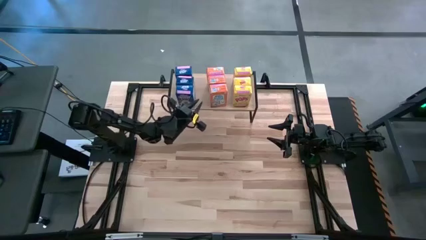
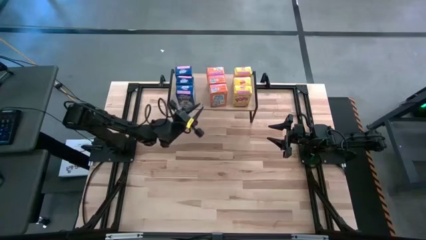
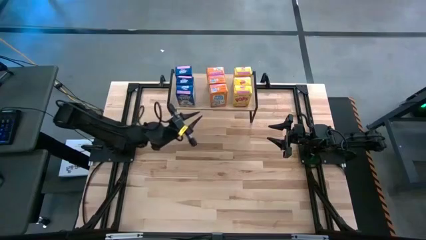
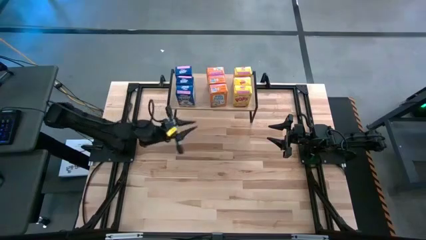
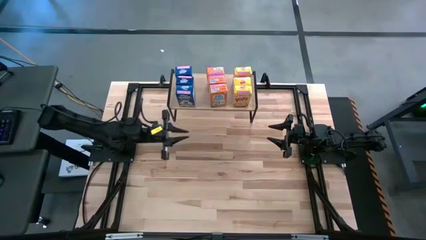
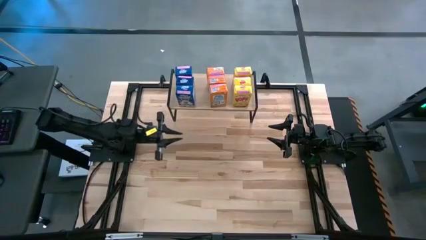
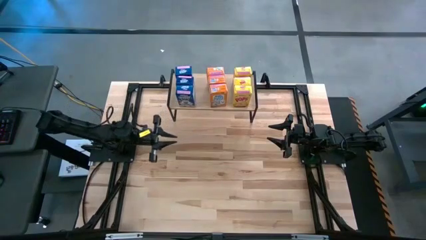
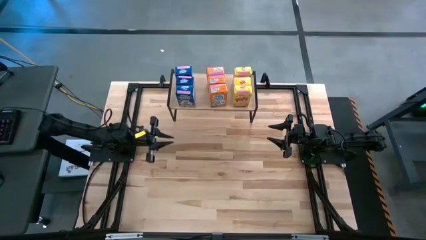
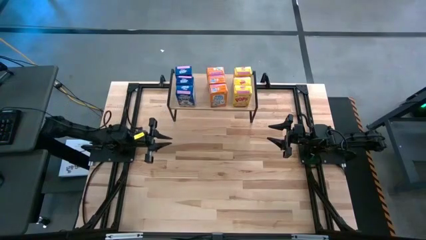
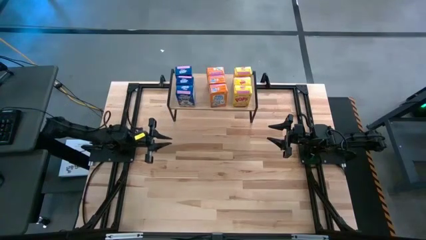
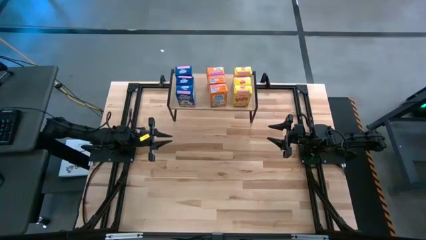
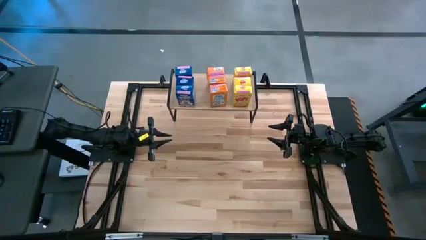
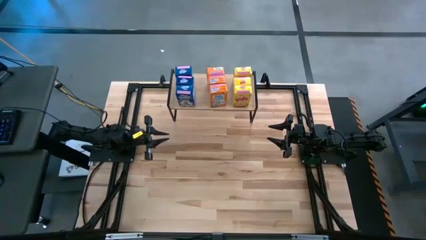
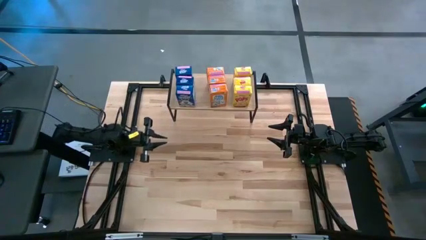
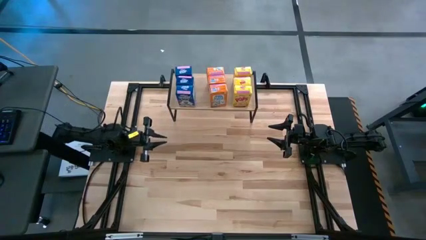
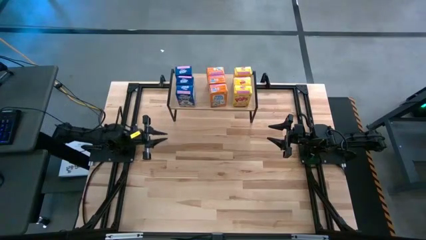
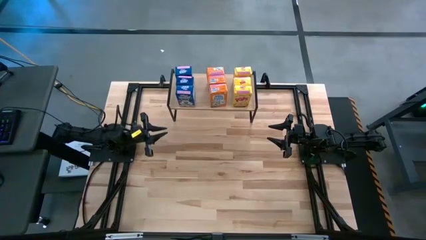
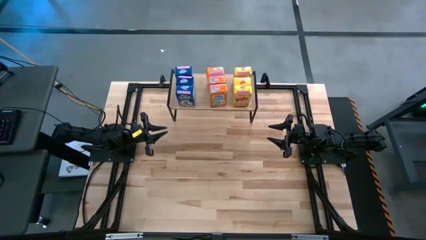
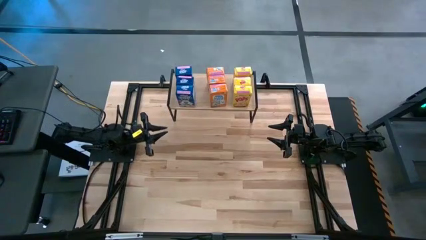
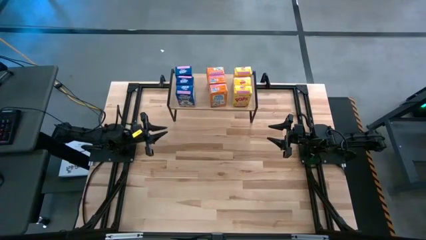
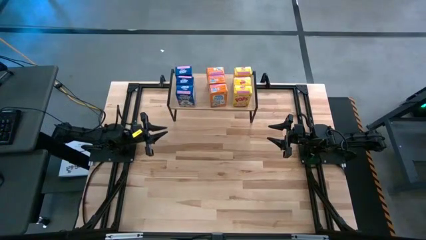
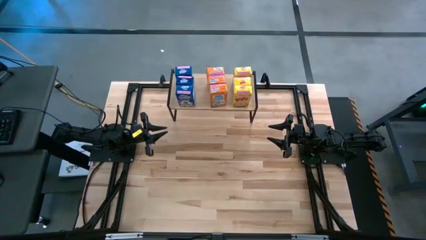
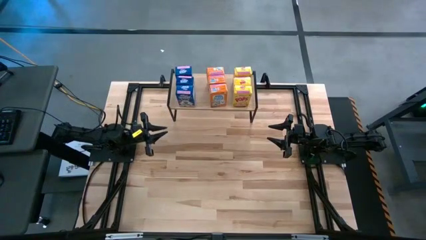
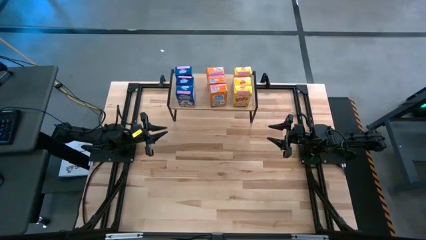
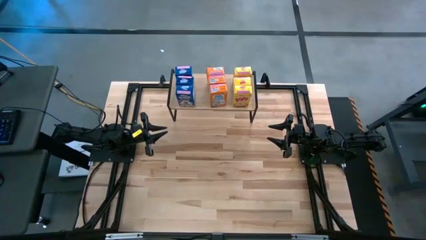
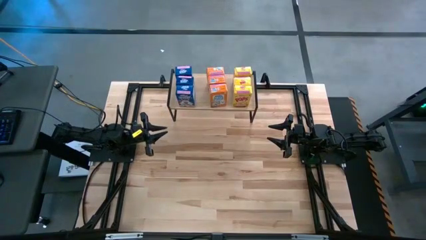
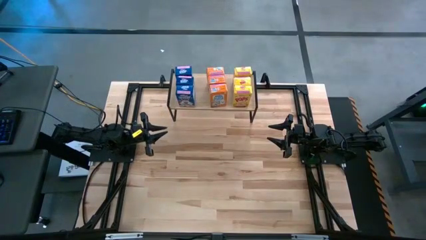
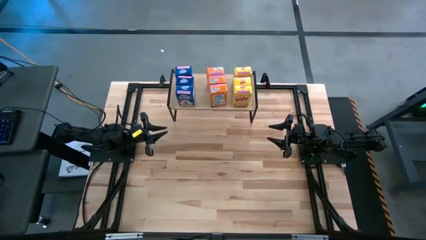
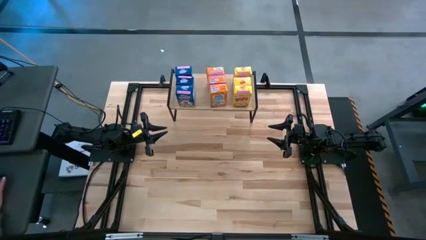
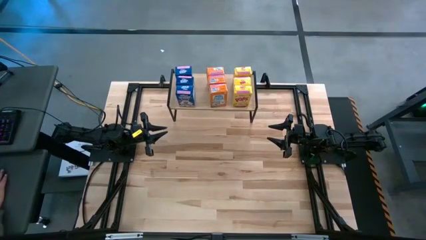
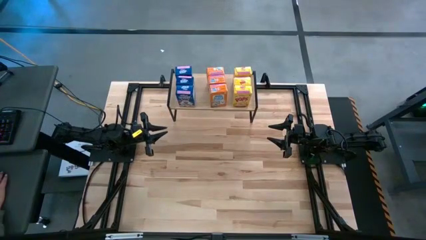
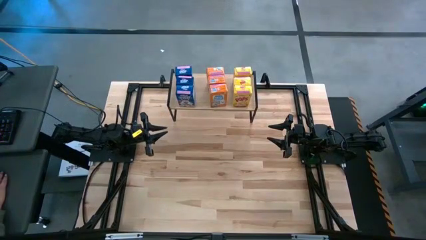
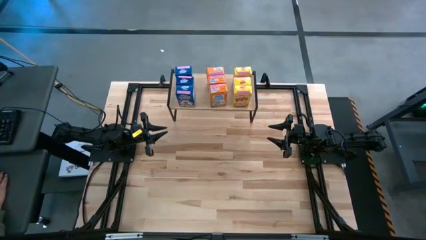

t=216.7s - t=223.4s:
Task: Stack cereal on shelf
Return to Home Position

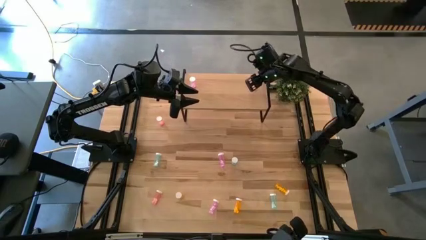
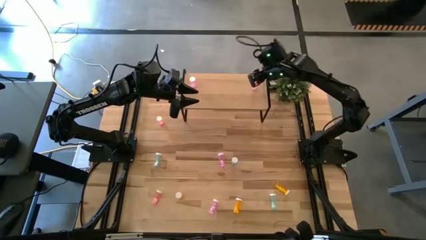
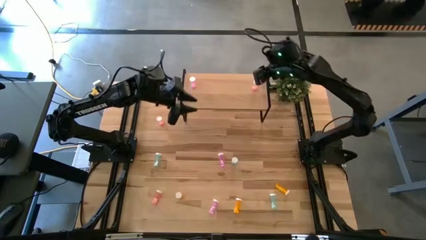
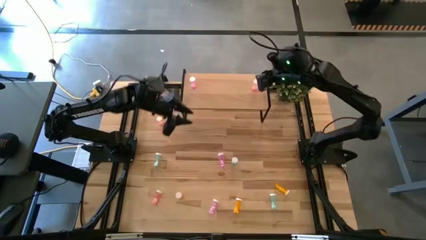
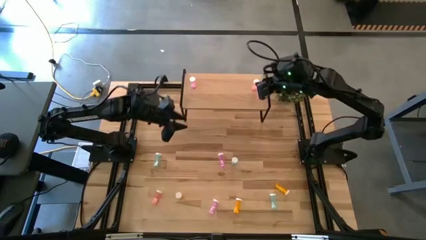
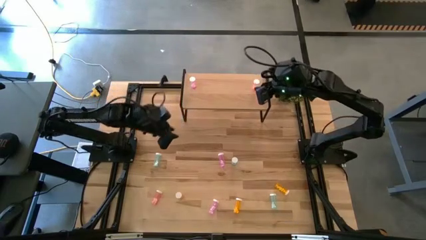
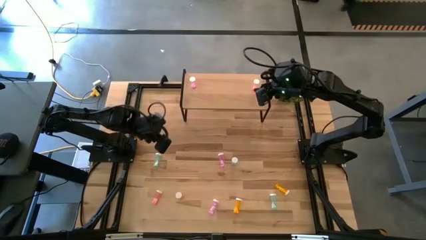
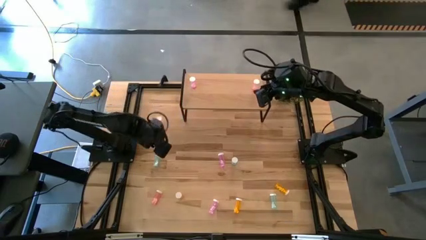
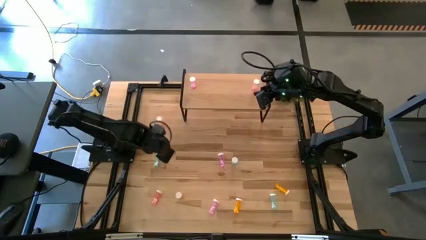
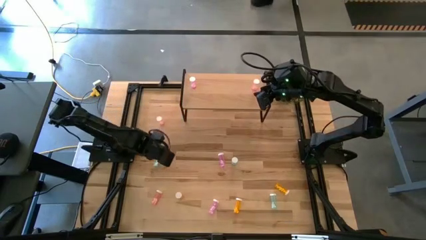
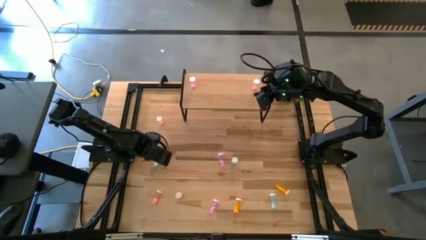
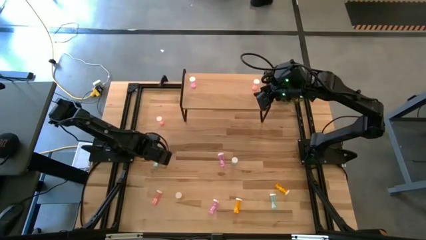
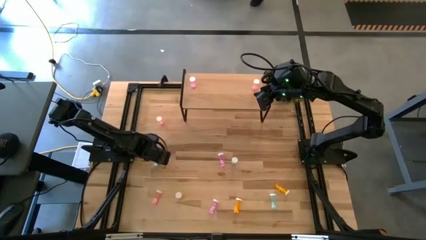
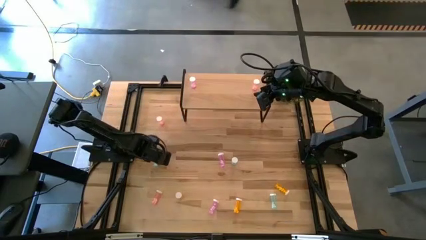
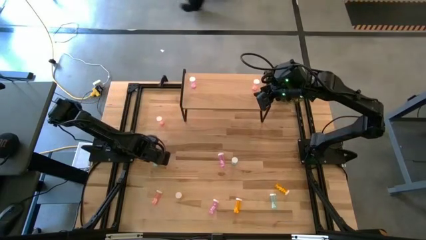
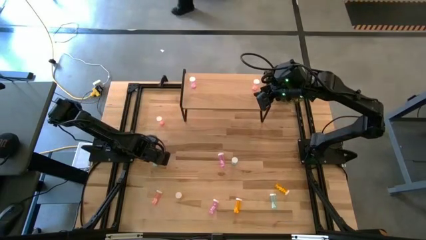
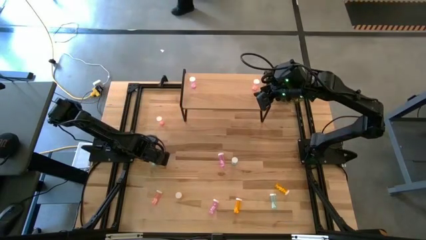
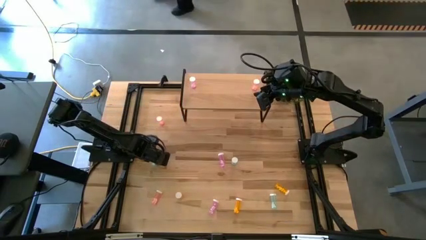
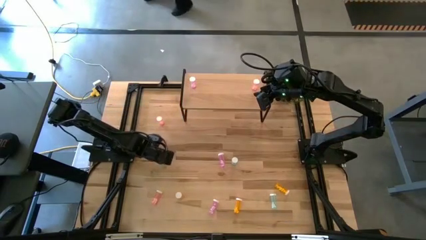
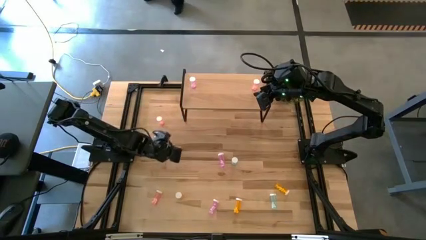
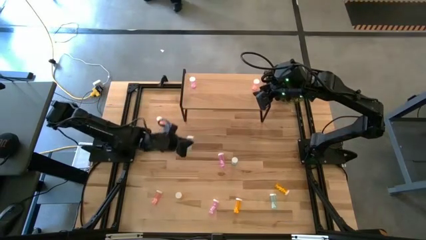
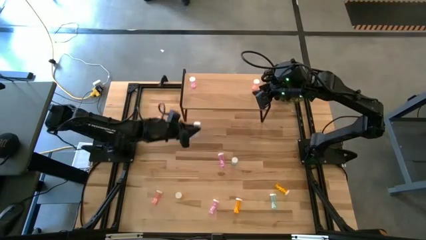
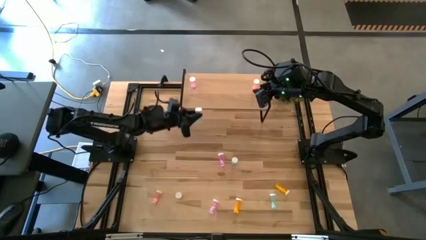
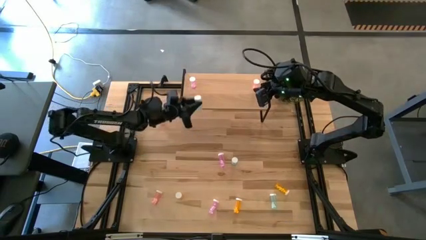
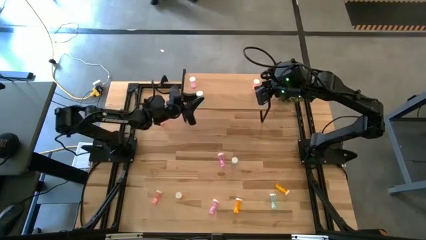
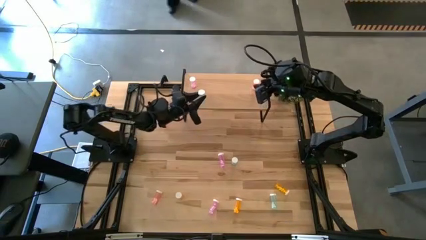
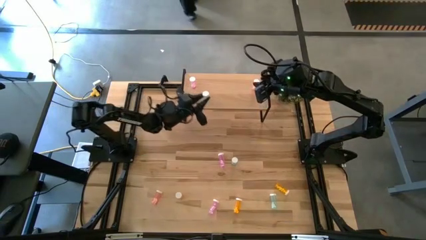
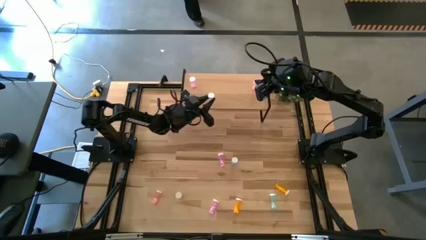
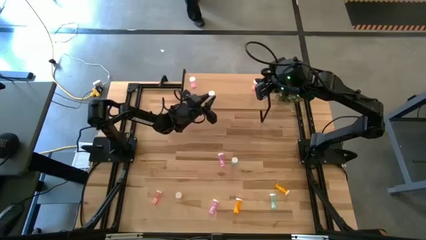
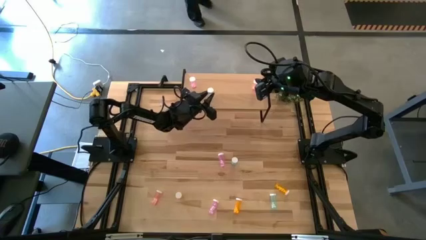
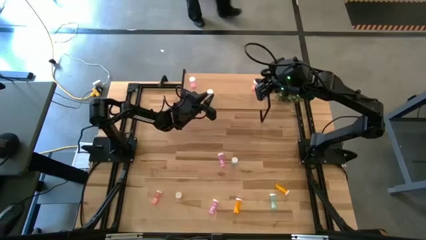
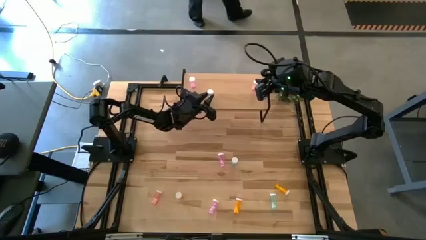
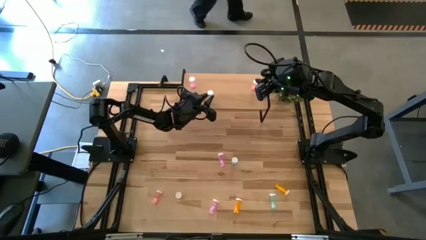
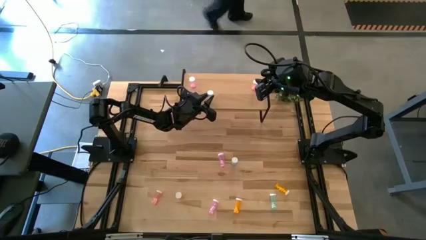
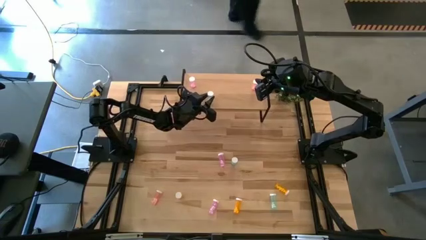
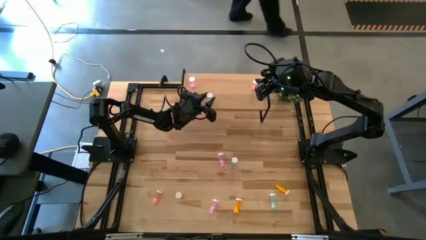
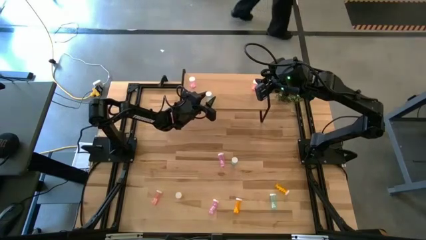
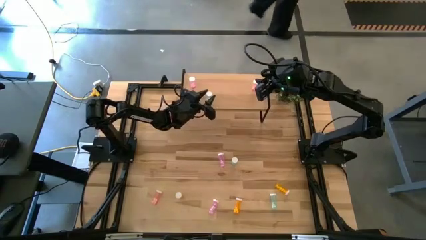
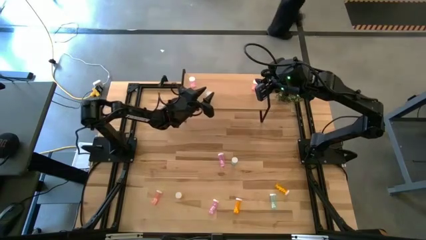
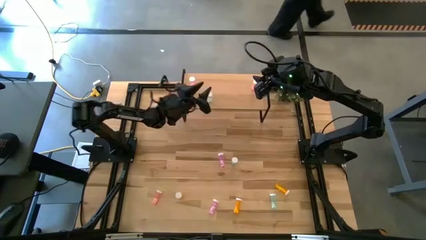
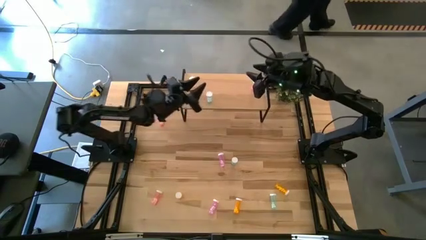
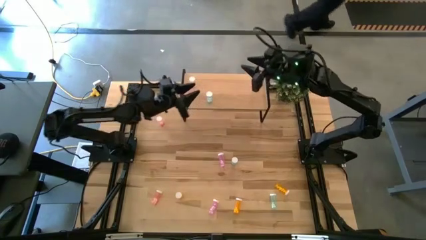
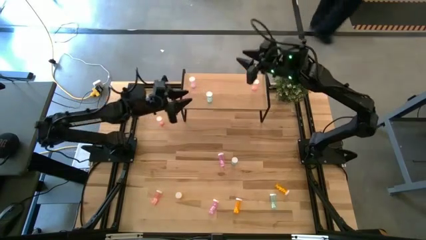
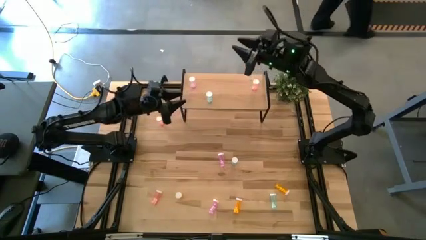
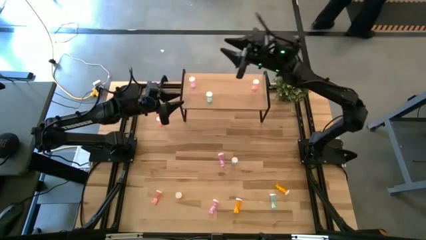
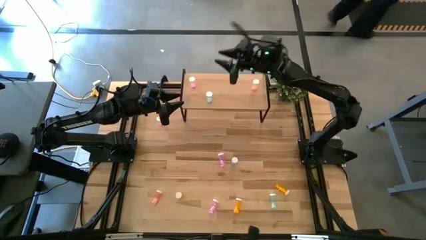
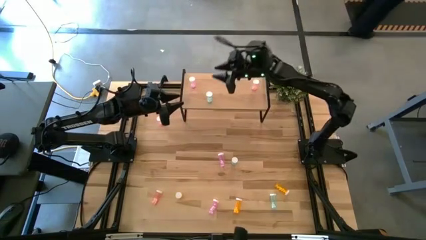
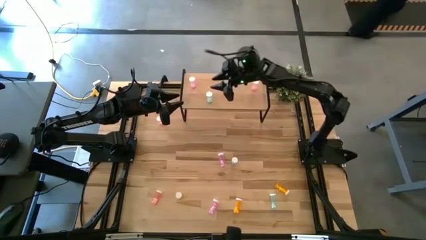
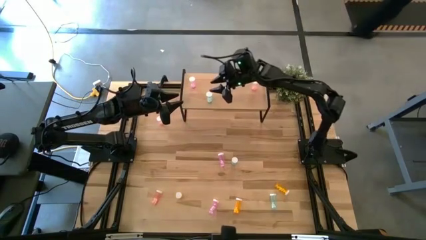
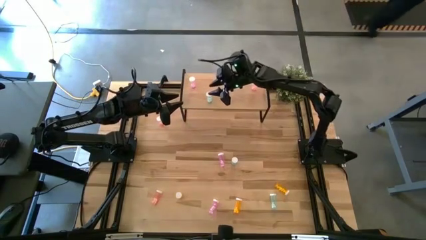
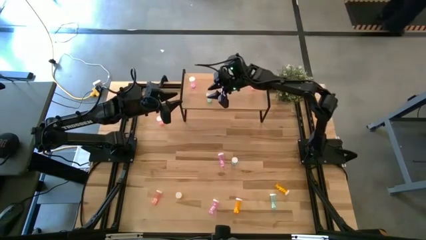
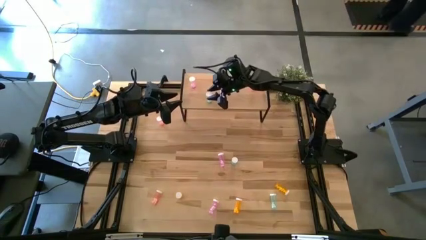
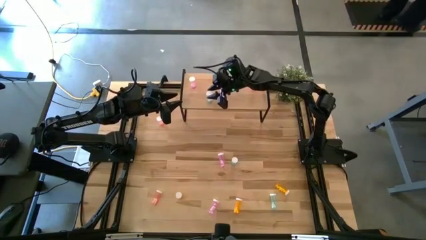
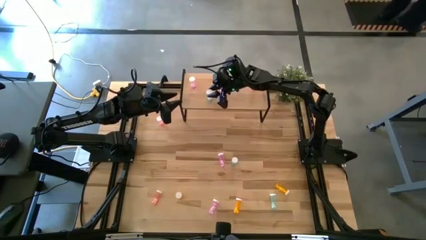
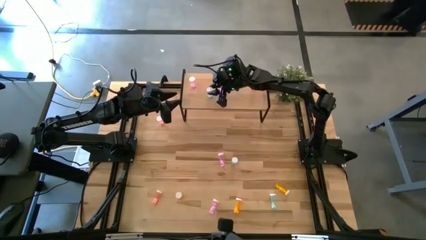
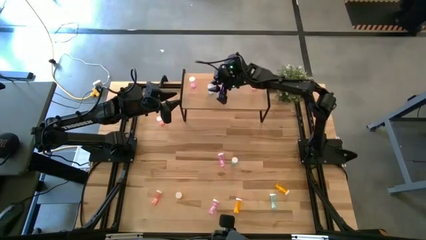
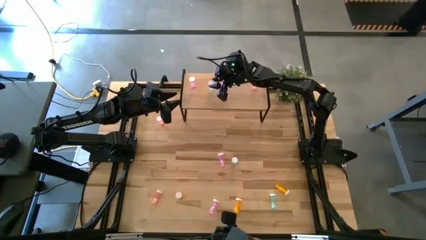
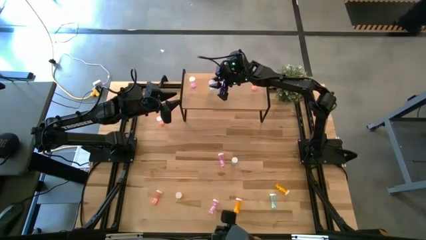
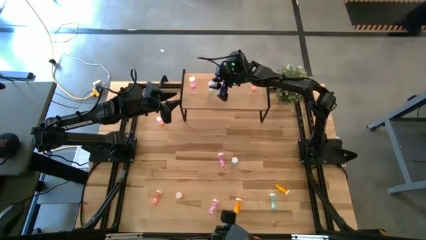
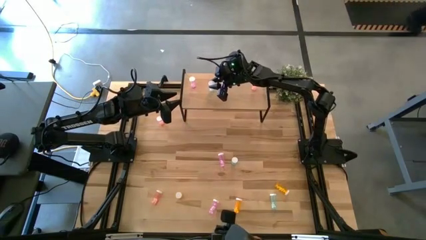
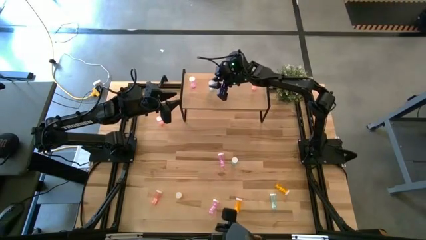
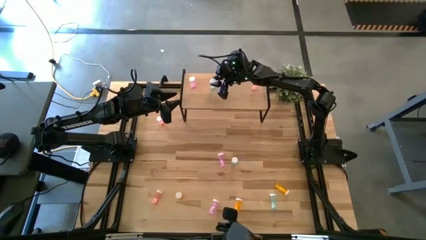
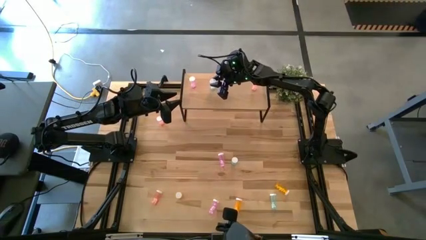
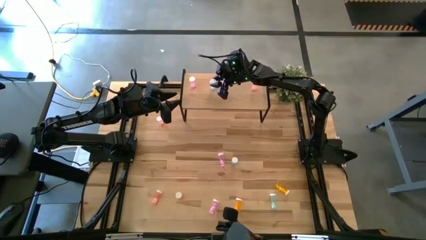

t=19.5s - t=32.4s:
Task: Pick and place medicine bottles onto shelf by color
Put the top left blue pill bottle on the shelf
